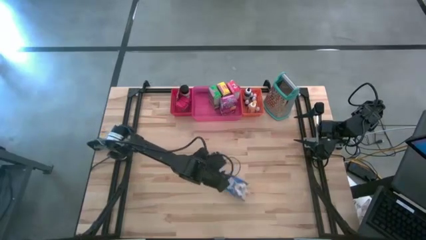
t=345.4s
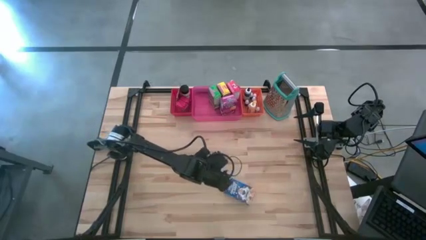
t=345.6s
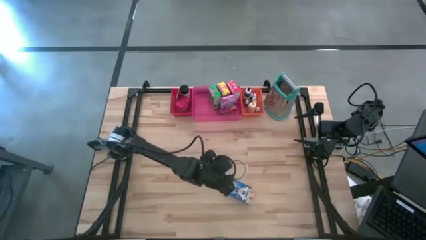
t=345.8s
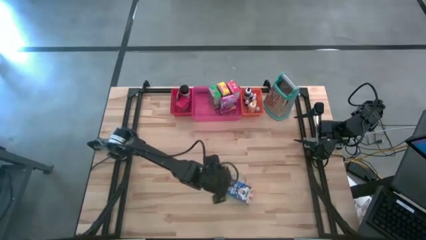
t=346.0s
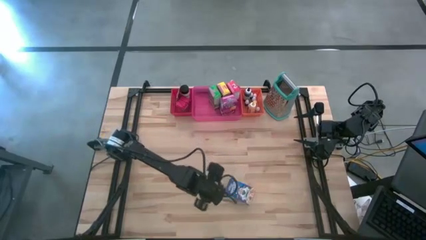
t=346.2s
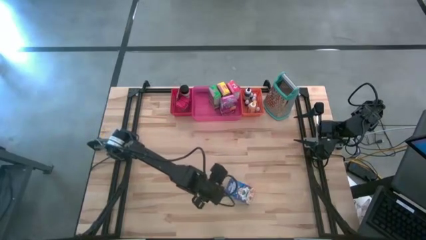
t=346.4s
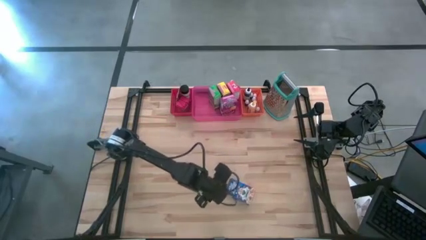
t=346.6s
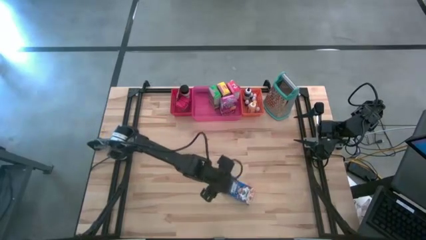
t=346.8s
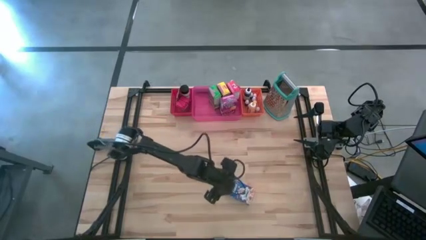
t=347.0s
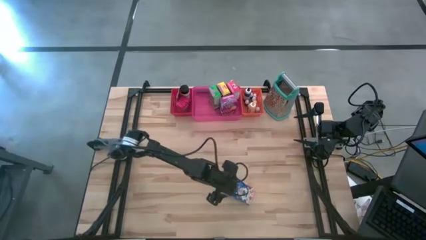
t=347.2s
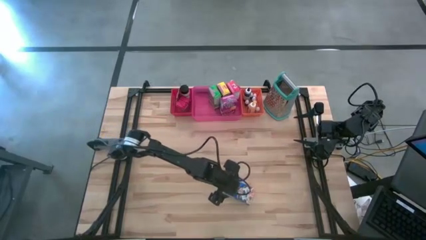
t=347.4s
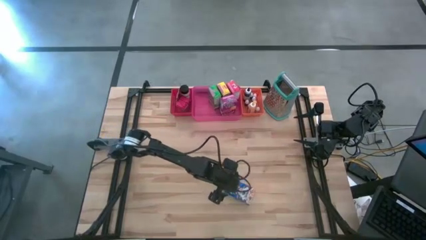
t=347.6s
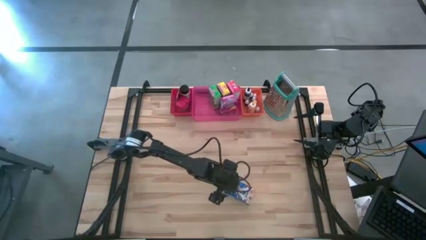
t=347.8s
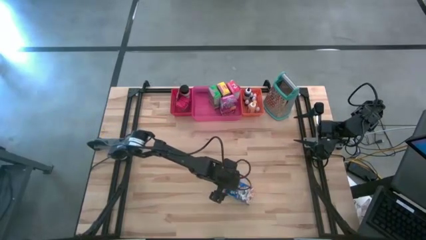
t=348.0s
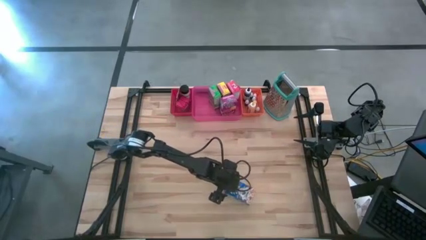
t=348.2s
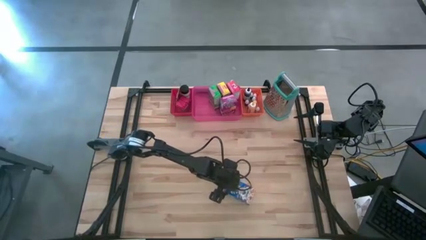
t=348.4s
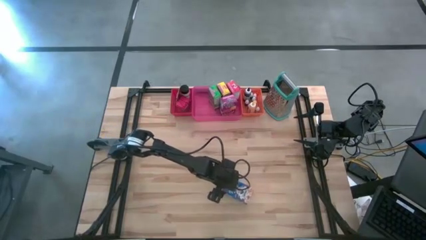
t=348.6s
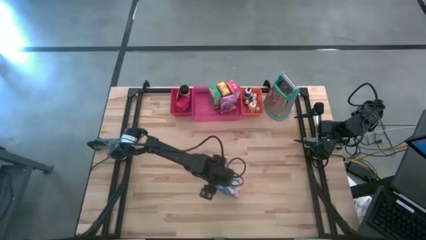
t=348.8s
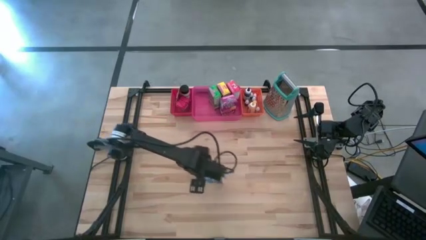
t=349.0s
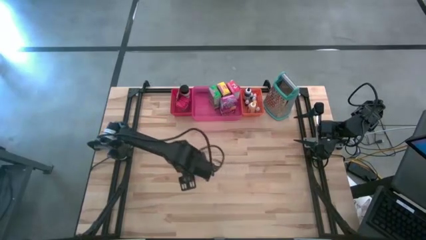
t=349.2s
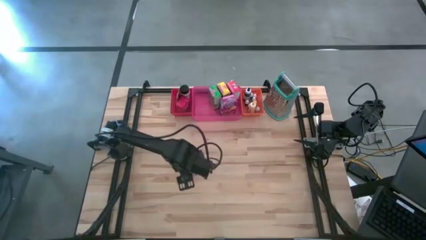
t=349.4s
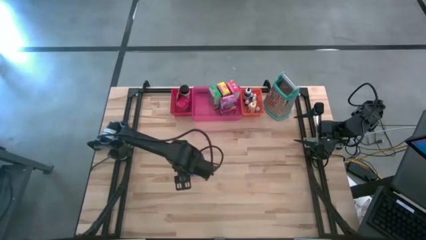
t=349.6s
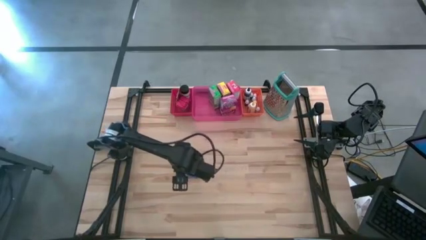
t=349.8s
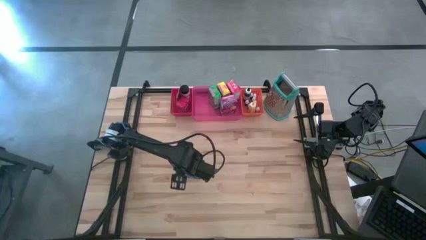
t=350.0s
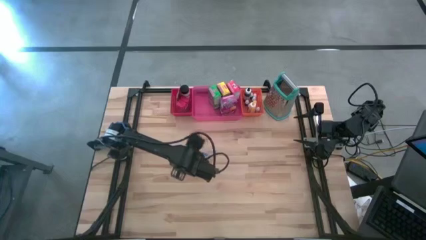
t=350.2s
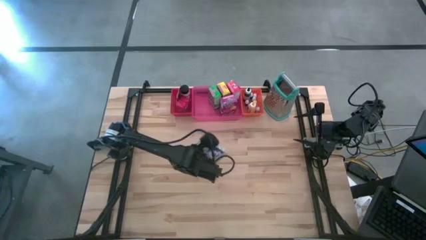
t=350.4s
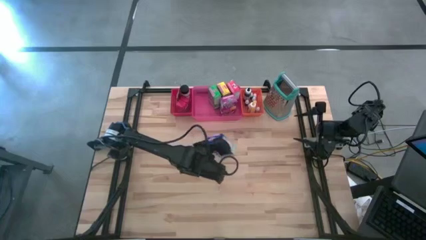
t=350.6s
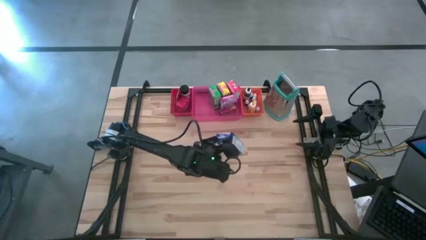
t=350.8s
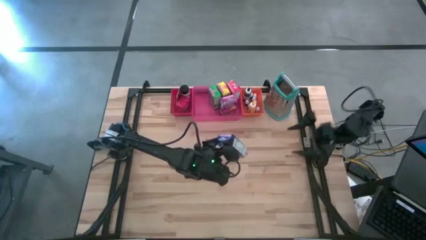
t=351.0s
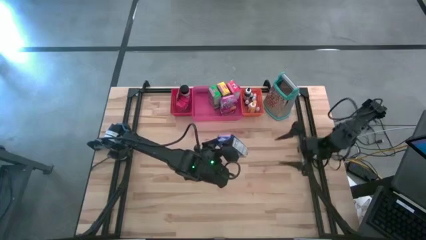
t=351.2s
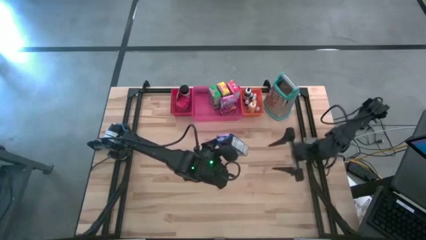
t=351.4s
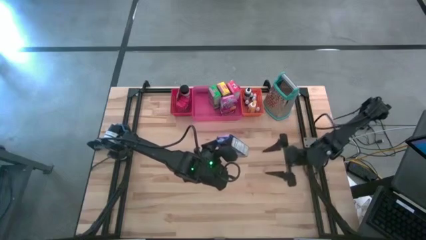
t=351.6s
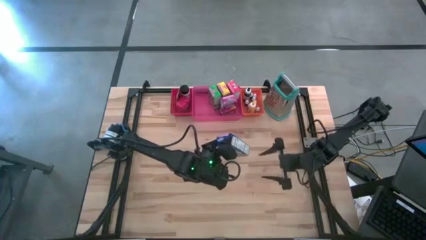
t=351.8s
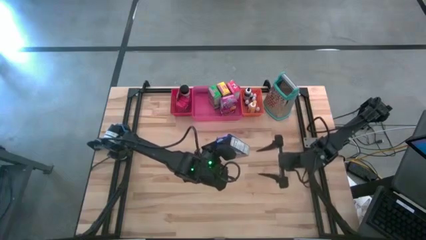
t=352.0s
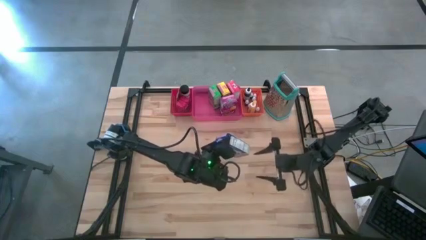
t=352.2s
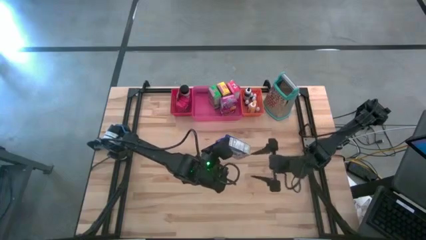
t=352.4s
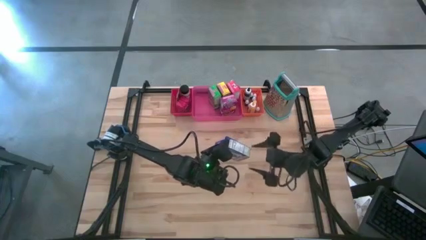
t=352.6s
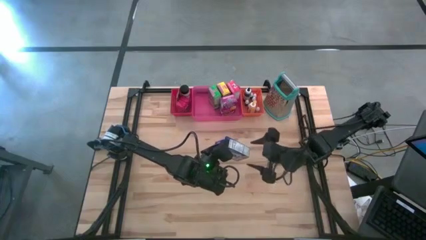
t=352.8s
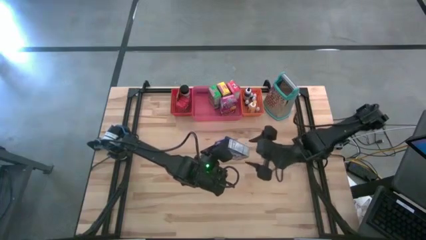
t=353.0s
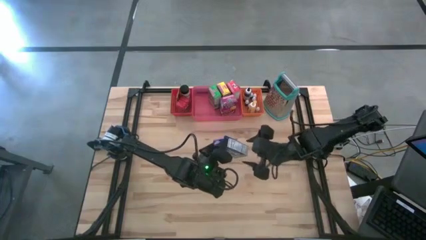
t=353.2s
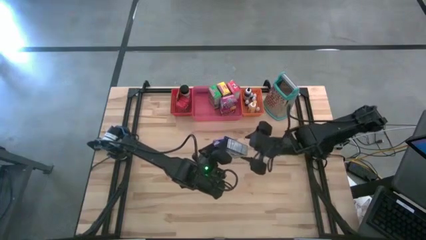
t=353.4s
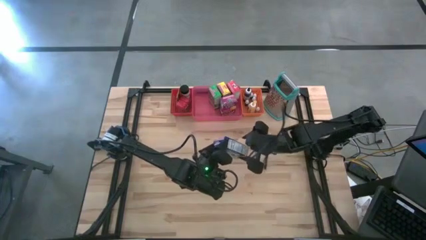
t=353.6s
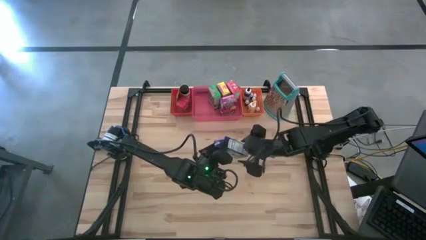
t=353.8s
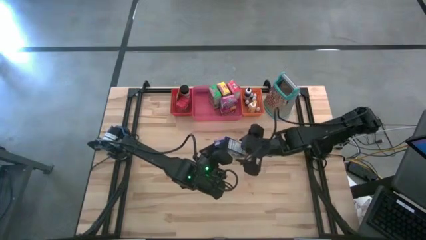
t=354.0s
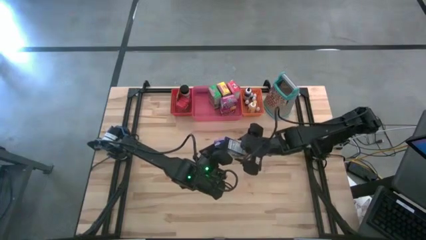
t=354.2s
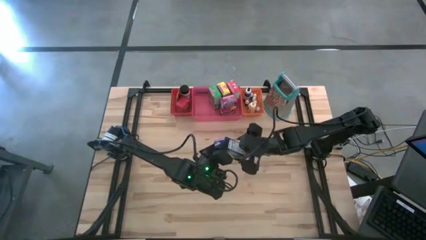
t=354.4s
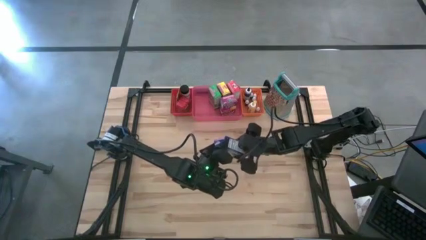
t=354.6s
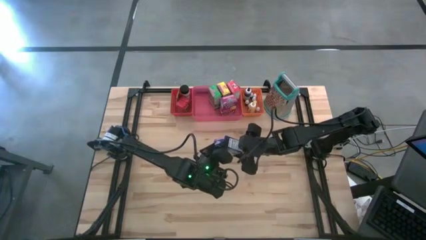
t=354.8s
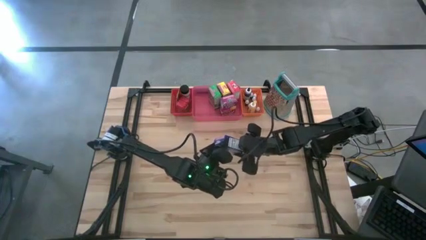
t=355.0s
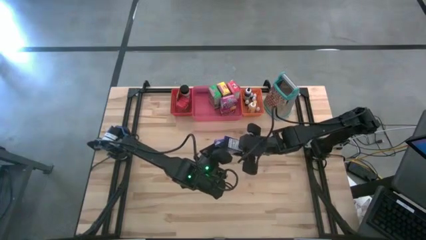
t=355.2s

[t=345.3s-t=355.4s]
Task: Pick & Place Kitchen Items
Put the blue cereal box into the pink bin

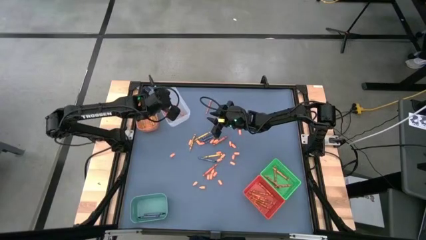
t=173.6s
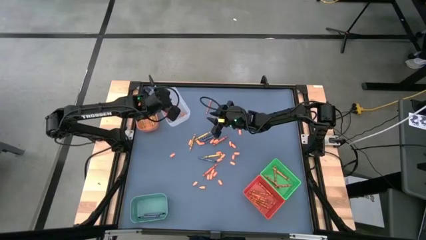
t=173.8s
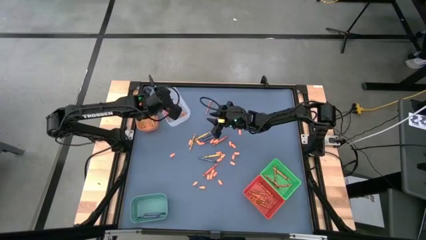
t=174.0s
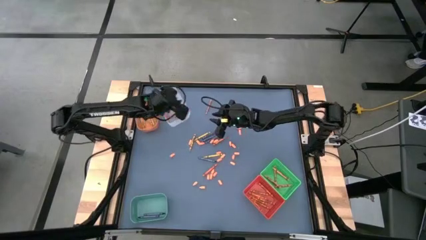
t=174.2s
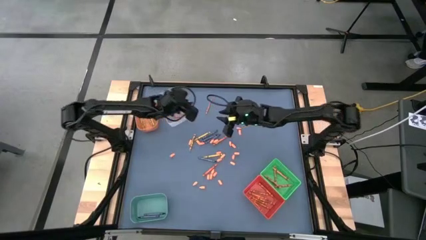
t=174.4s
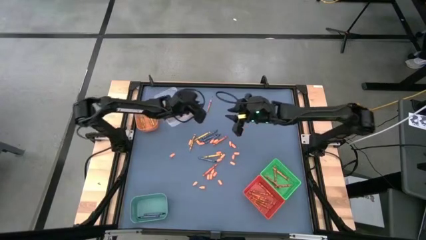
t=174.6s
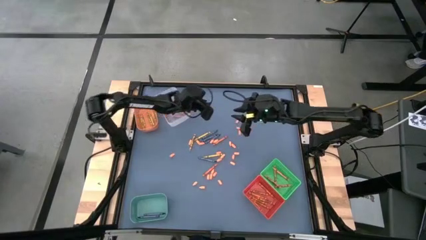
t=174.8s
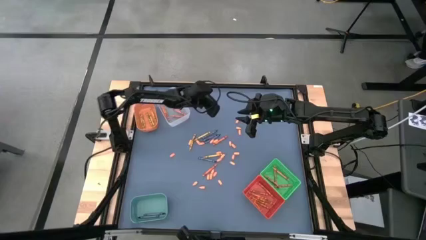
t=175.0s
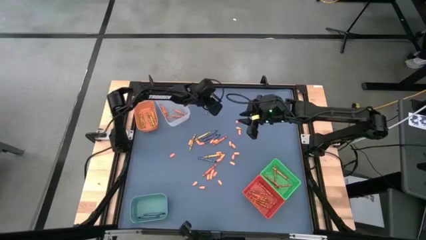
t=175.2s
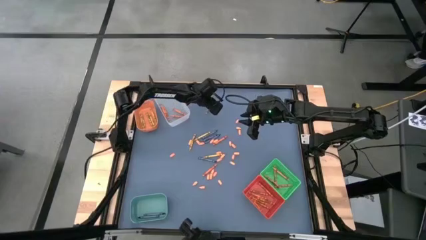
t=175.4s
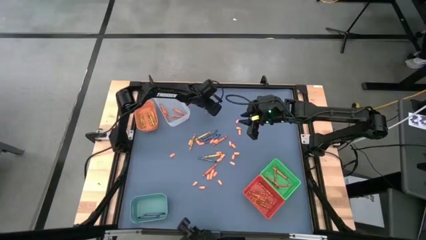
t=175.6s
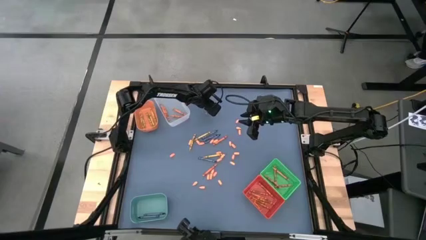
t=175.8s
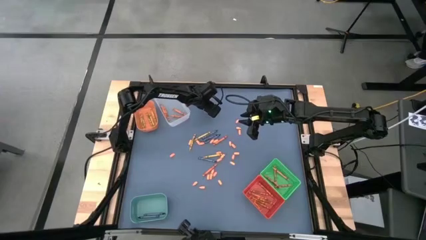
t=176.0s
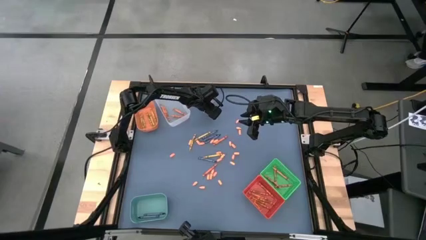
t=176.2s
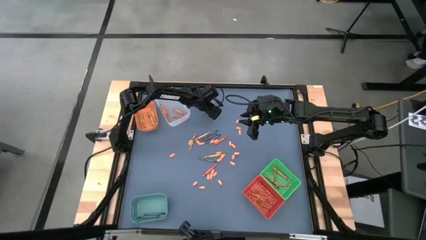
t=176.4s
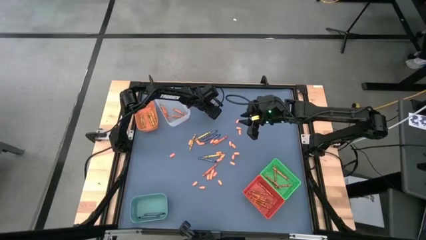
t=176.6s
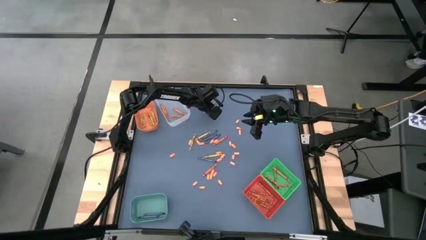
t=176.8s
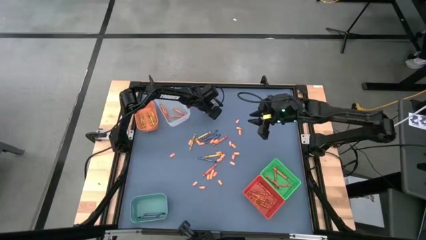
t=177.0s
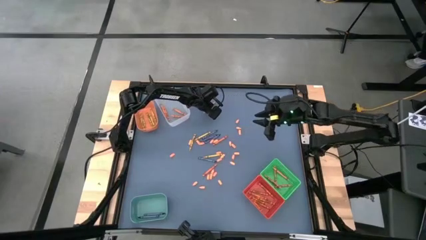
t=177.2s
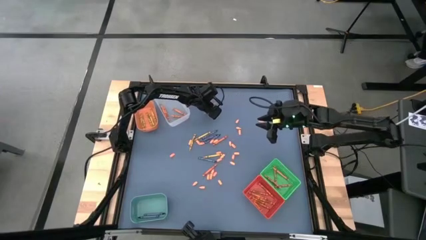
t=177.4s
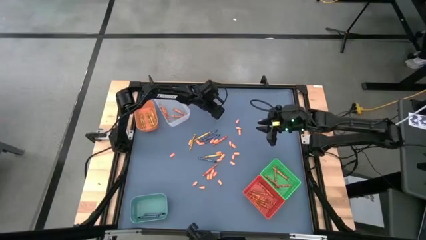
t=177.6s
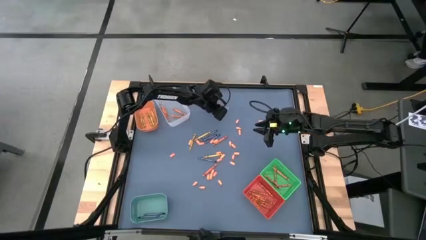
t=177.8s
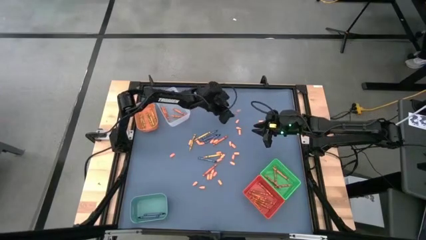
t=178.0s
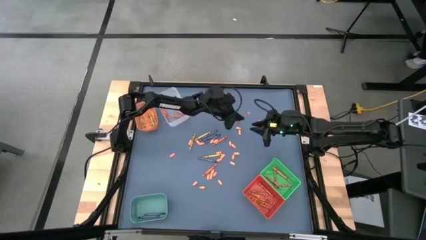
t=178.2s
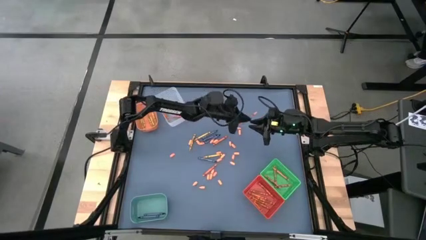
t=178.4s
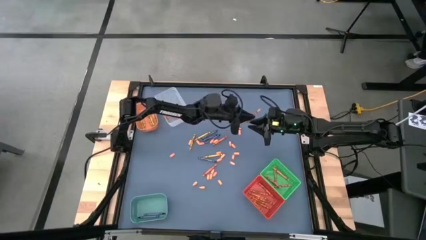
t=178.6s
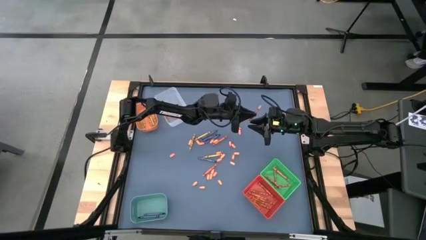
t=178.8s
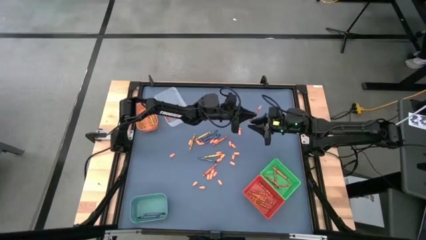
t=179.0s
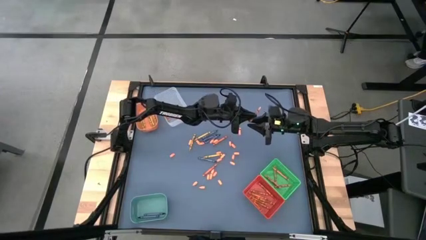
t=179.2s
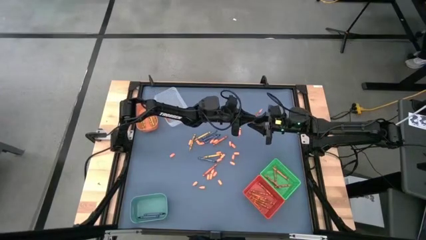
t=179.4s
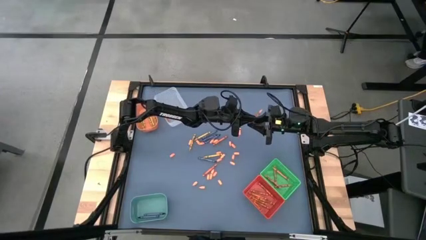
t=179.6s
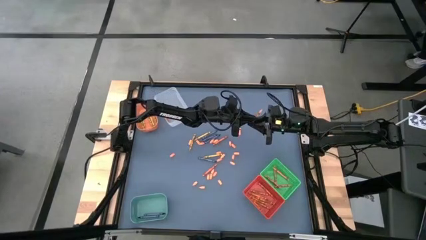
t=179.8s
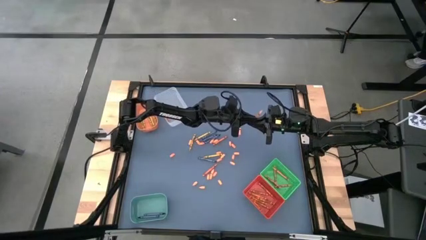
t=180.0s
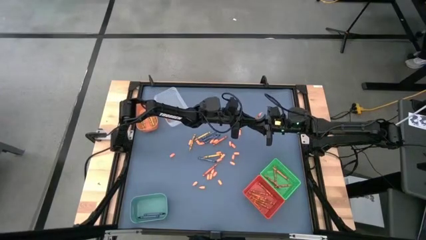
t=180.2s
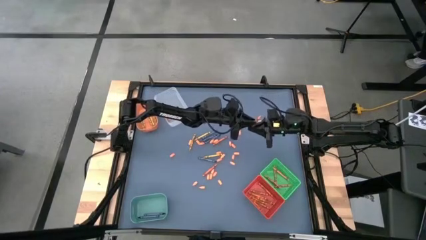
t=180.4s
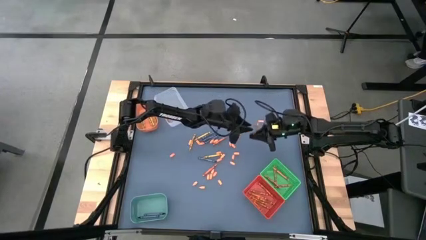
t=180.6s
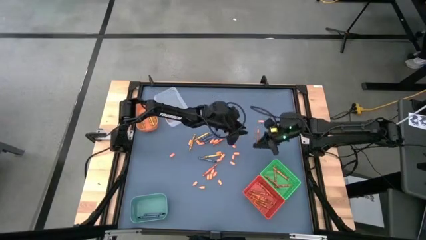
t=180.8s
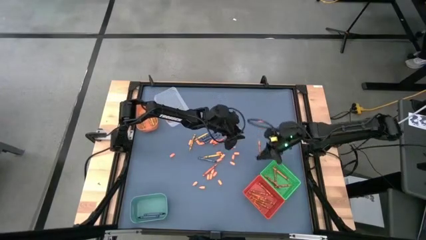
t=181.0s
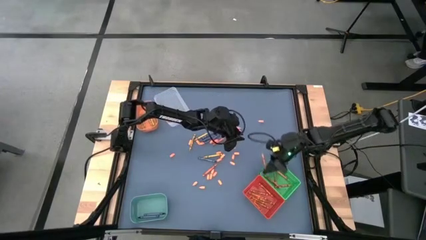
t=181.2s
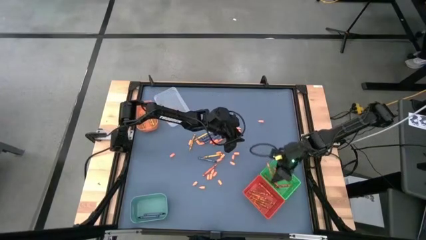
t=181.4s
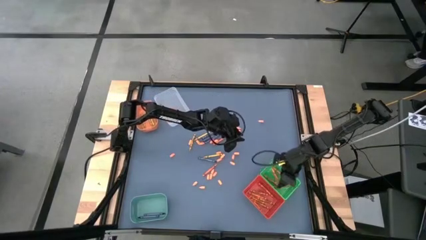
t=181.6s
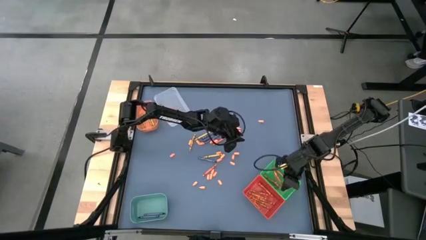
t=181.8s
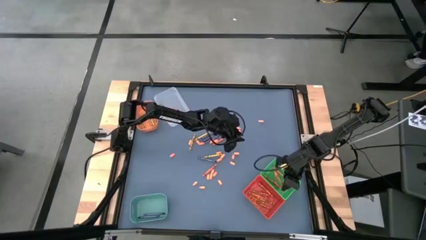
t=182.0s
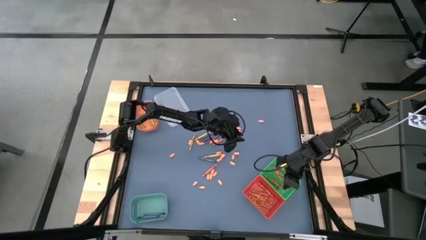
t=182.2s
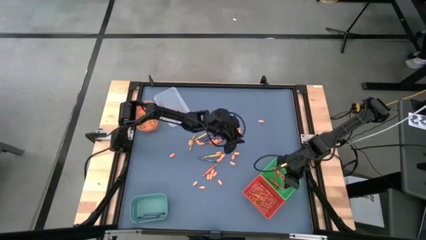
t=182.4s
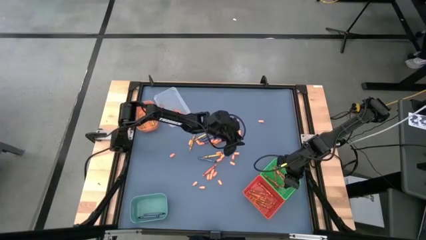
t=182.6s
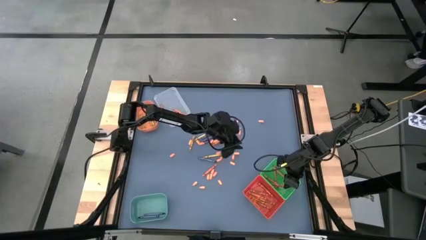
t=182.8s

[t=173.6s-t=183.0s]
Task: Sort crayons
Put the light orange crayon into the green bin
